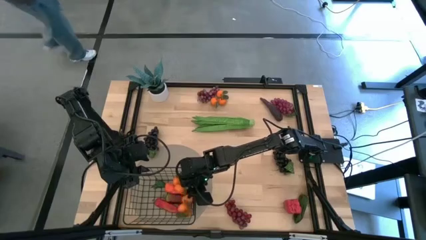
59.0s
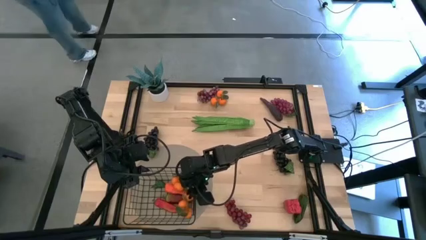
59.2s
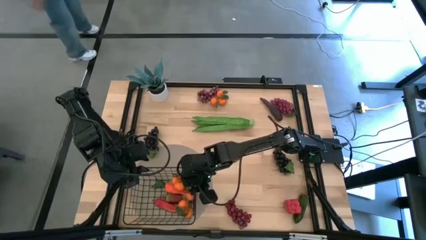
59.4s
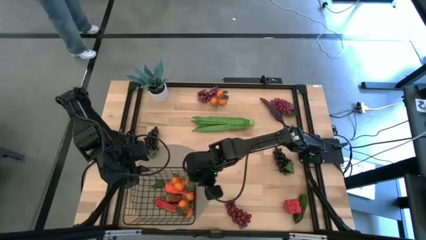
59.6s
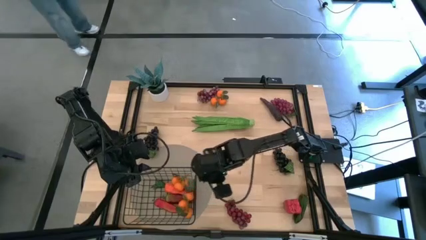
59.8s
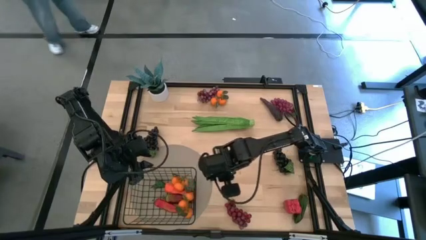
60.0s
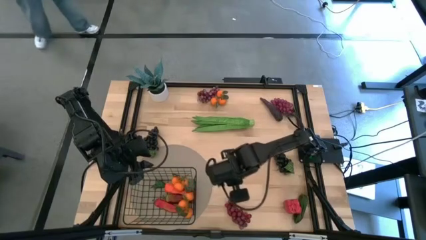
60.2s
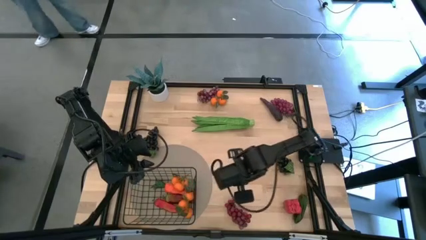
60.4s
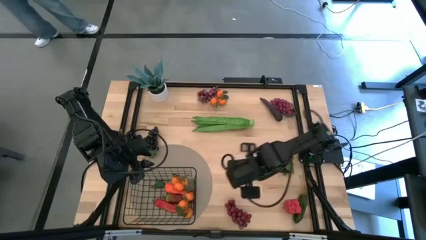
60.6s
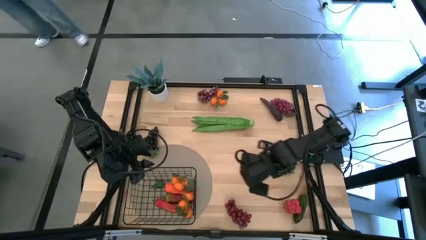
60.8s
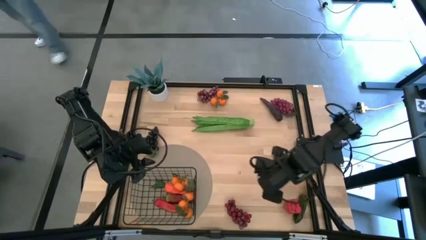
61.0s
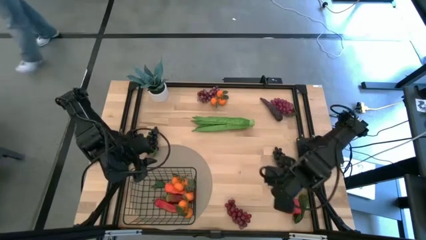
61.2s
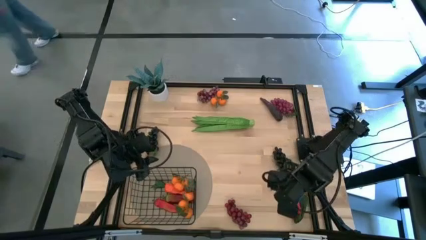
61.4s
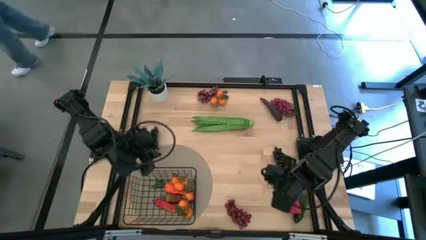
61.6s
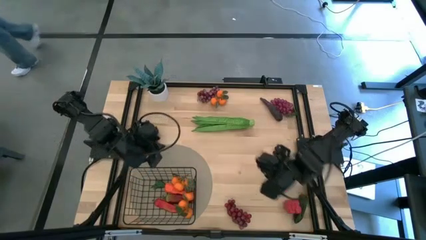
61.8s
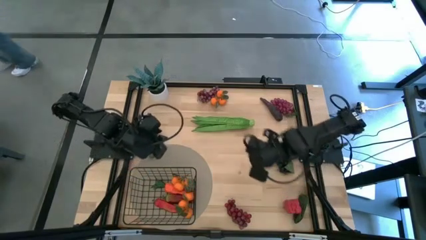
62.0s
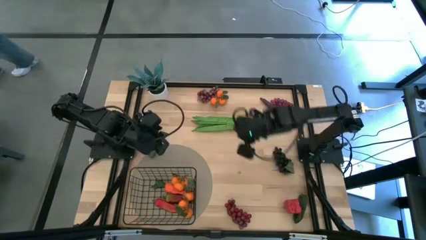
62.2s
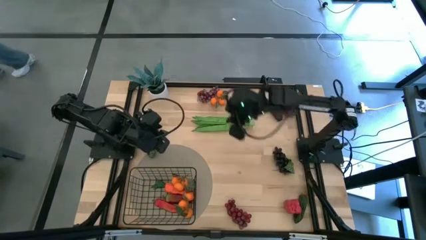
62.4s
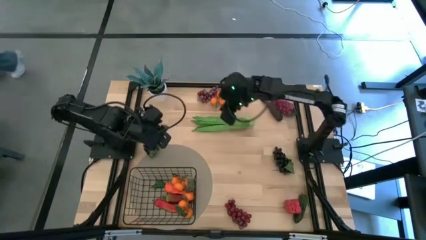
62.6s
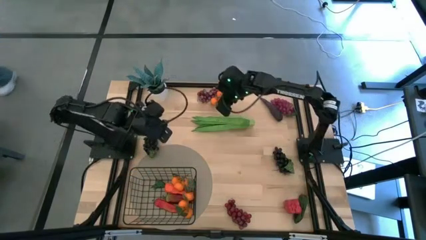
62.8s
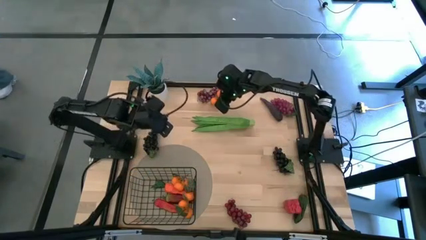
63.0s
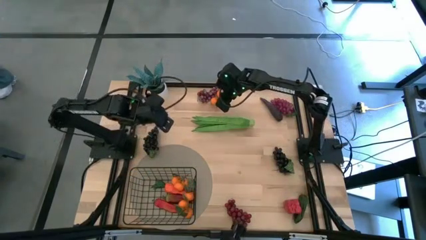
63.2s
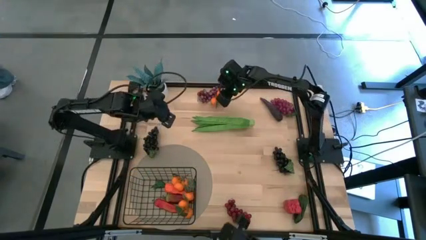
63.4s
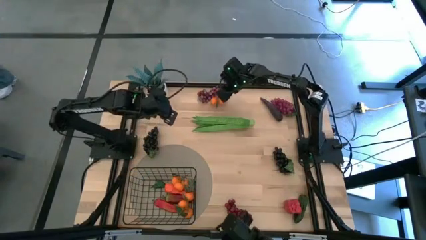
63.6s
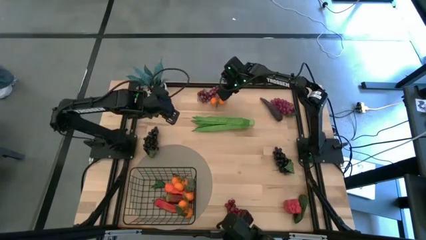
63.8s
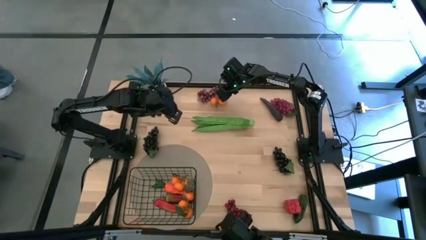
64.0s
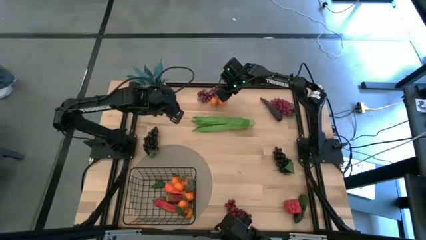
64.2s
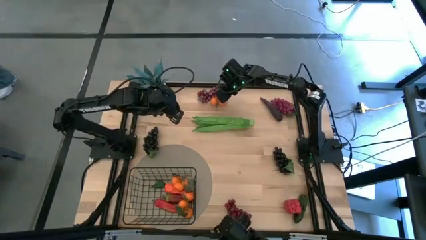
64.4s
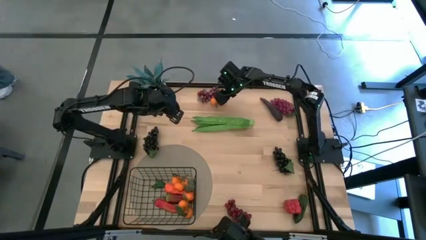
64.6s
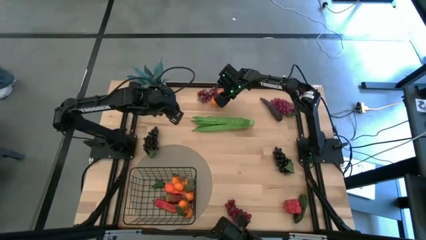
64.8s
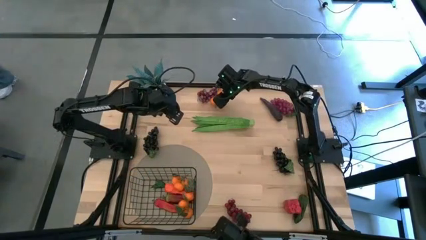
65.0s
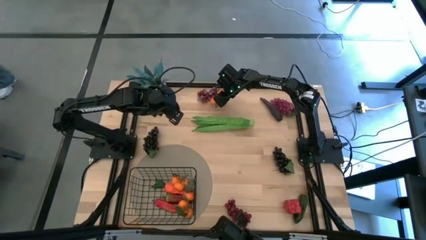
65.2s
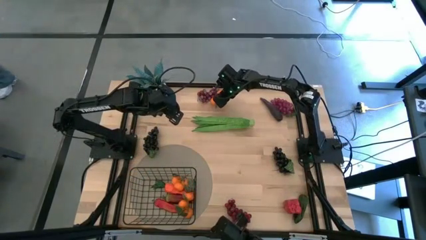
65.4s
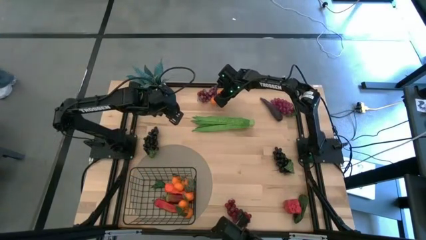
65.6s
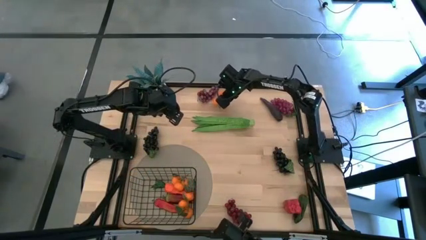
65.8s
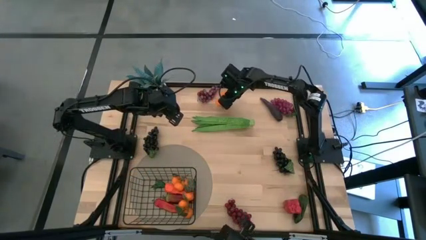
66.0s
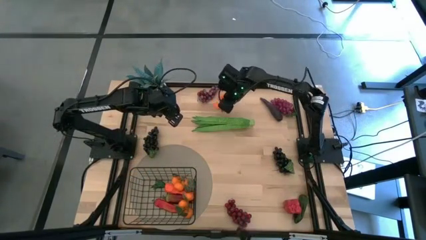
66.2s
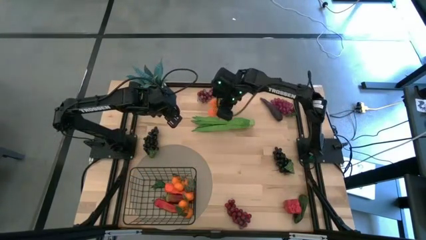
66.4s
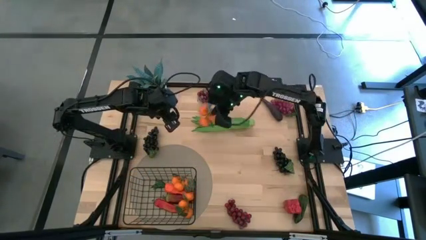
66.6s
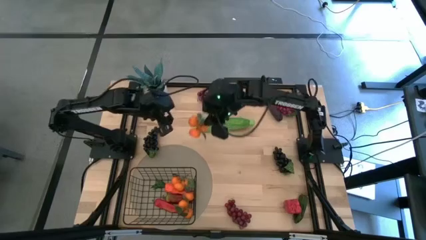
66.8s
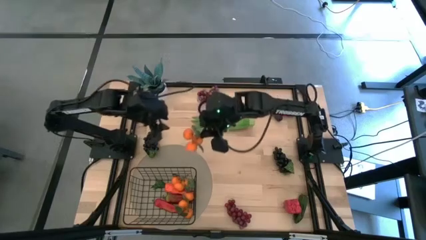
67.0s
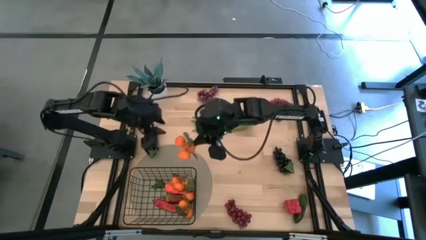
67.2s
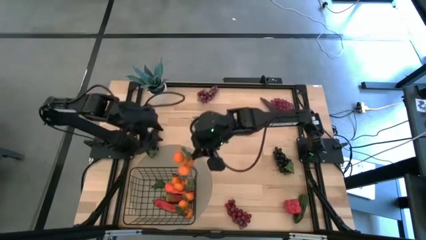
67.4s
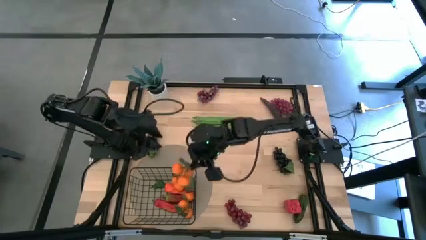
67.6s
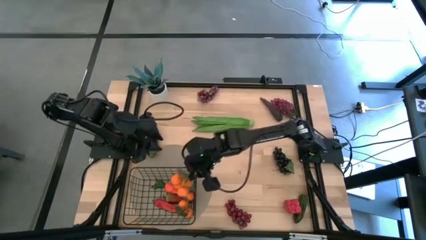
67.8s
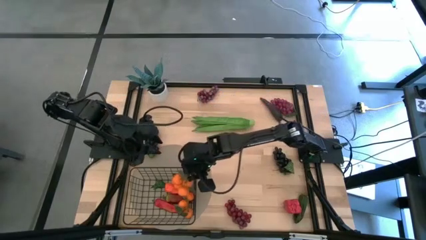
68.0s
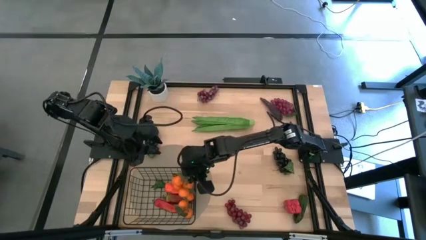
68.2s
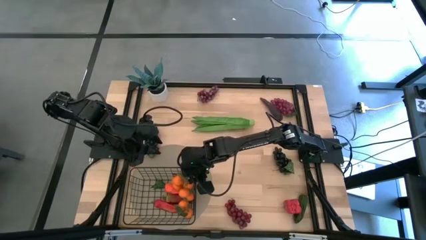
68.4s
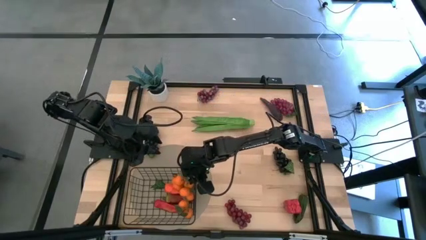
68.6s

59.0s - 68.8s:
Task: Build produce basket
Put the bunch of tangerines into the wire basket

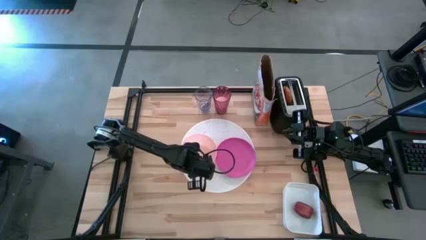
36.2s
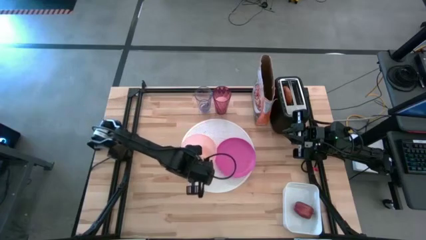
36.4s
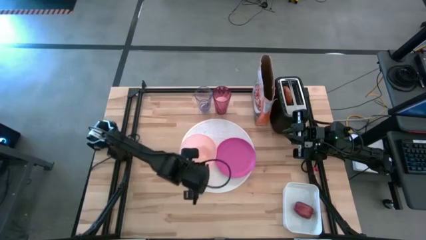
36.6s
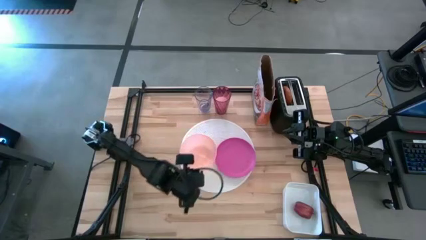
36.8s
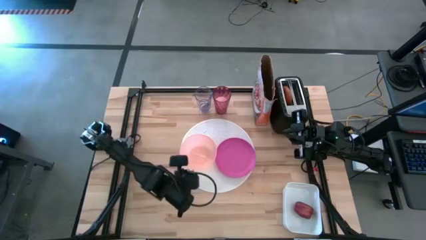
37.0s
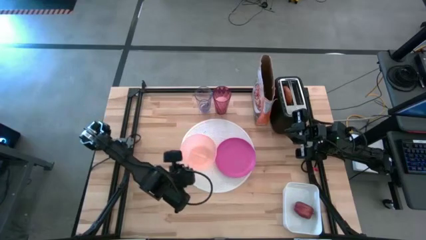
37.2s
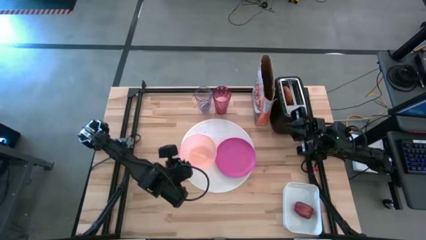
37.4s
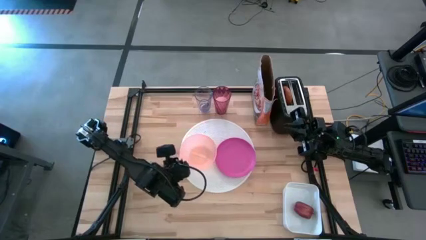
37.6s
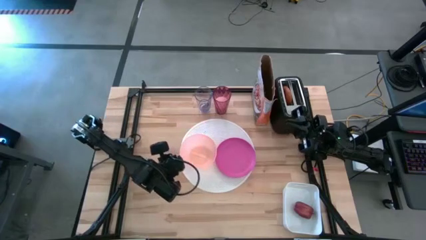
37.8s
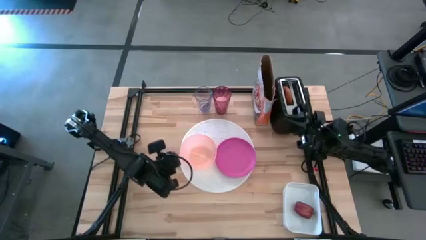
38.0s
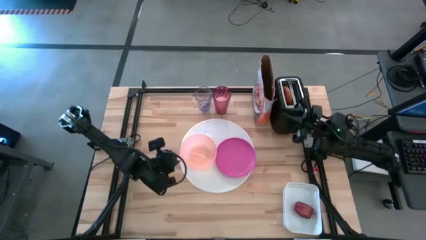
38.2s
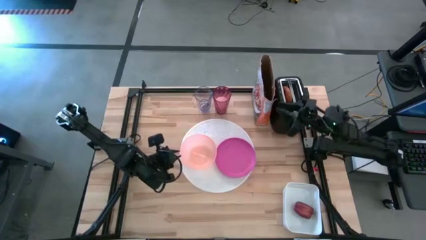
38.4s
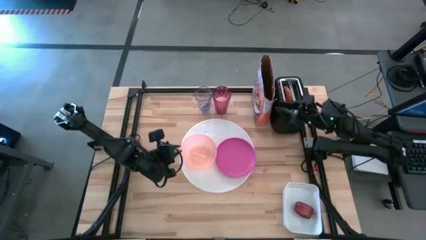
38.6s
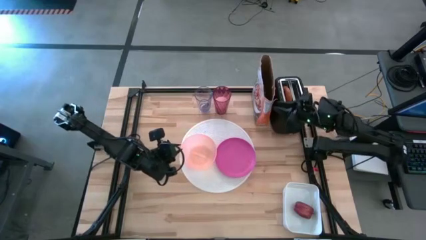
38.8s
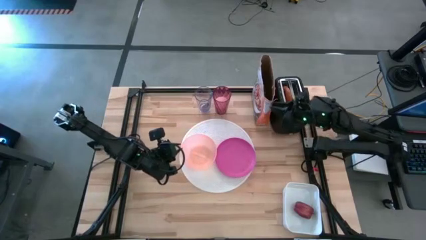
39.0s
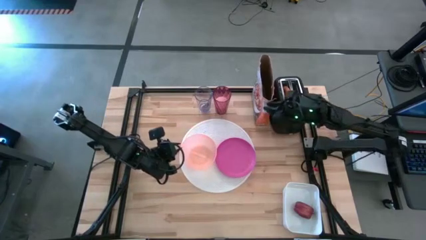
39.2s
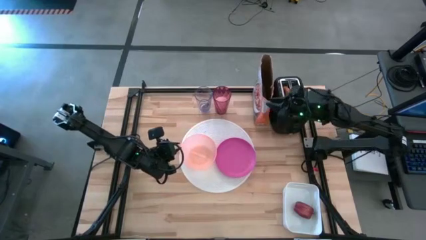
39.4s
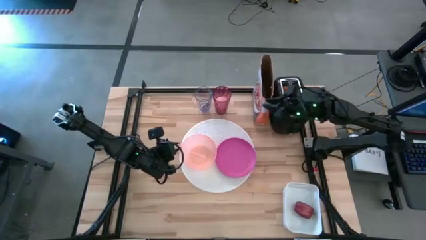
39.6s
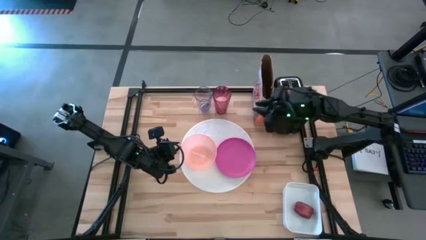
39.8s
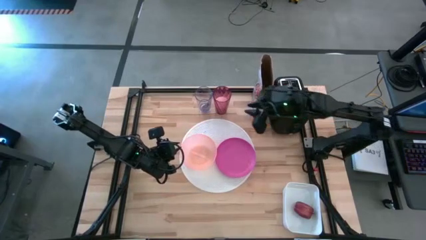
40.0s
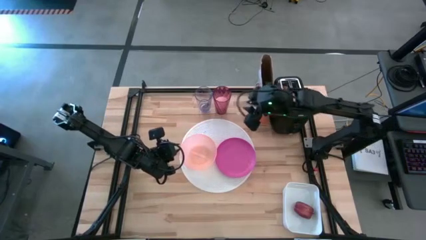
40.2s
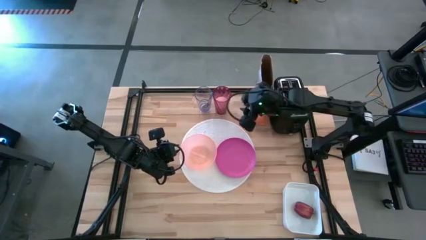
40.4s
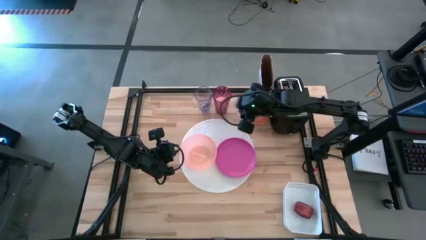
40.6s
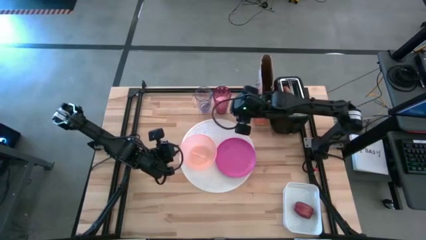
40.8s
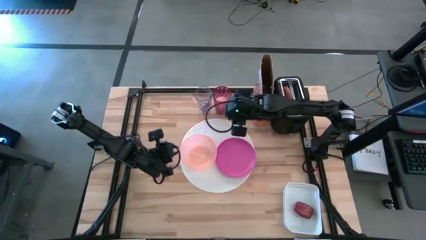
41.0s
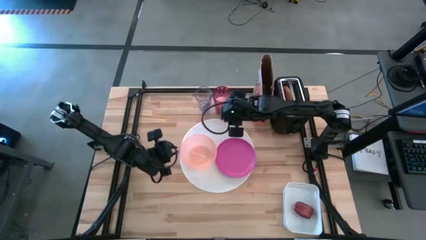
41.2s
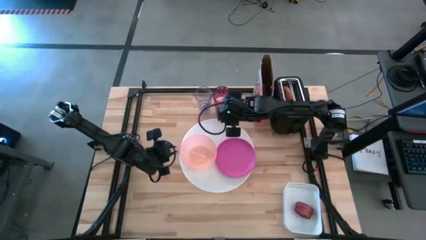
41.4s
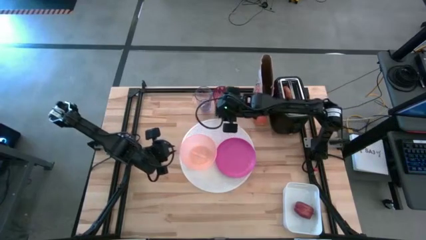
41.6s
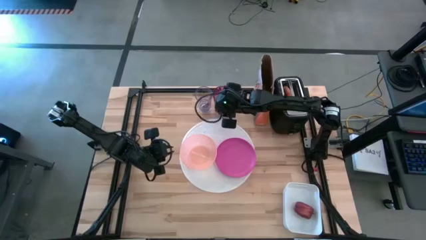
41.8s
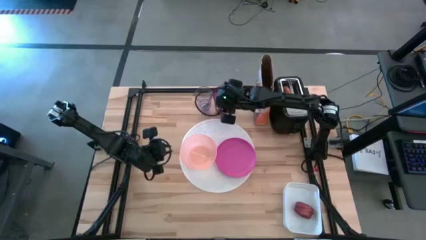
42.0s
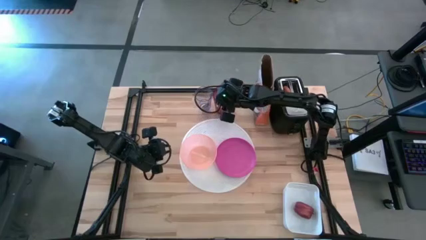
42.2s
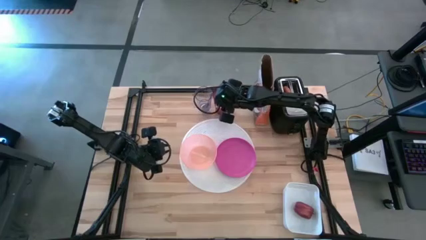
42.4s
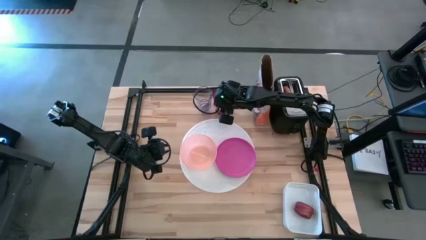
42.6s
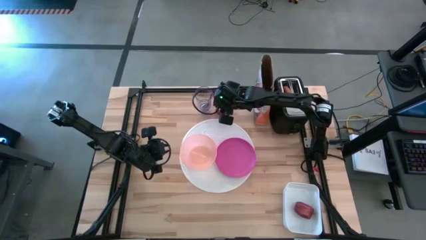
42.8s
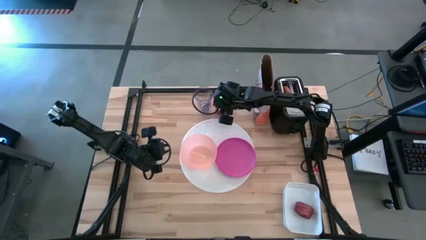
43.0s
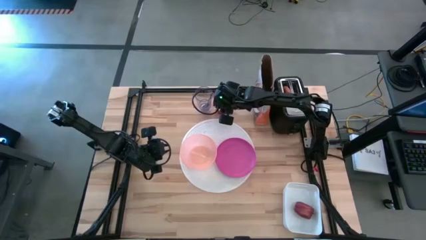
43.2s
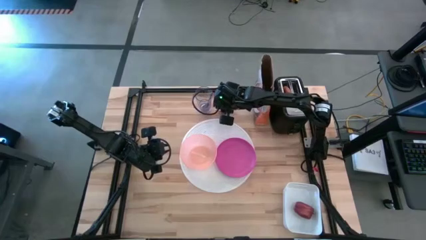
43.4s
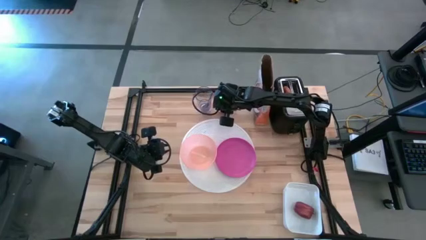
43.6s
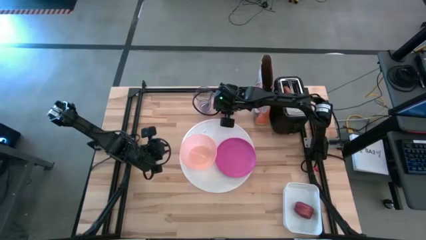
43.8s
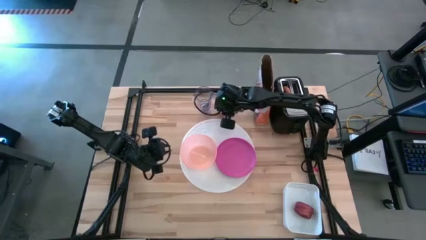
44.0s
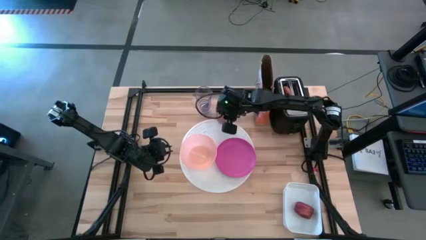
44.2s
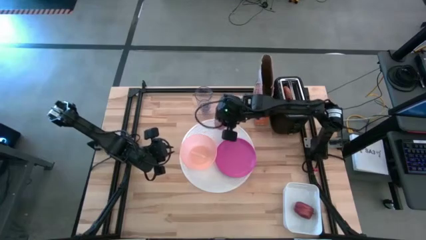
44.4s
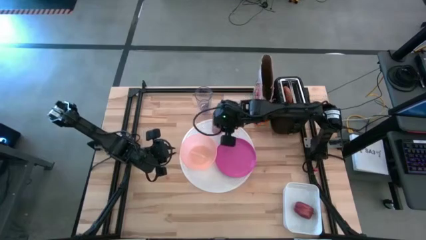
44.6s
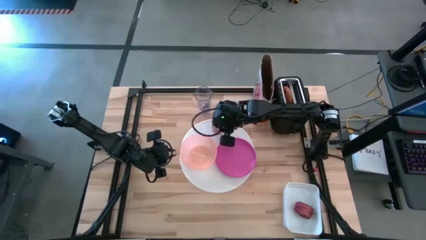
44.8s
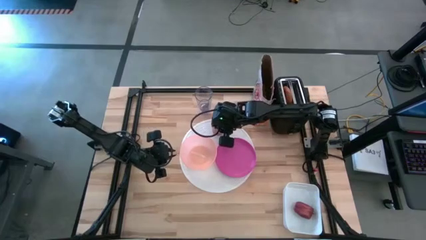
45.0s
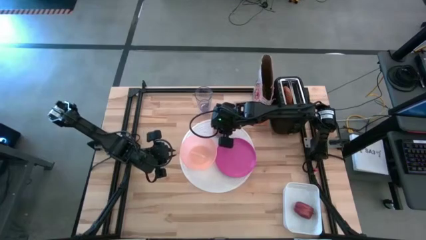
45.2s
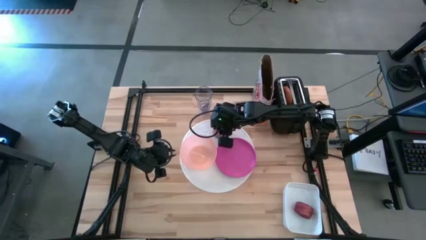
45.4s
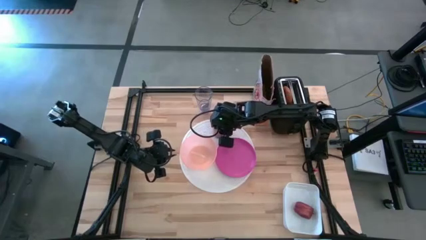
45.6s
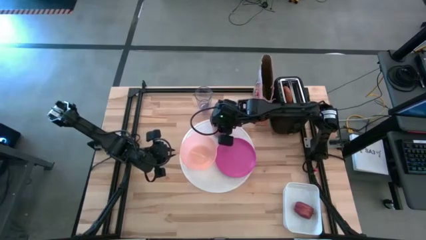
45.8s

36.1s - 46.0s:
Task: Arrange a breakfast setting
Put the red cup on the white table mat to the top of the pink plate
